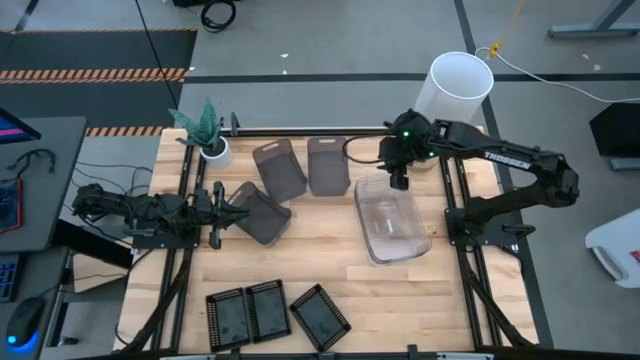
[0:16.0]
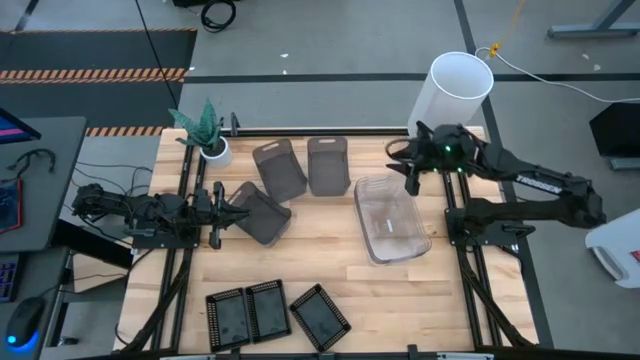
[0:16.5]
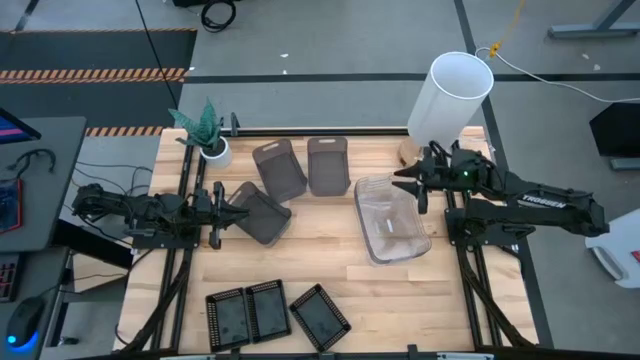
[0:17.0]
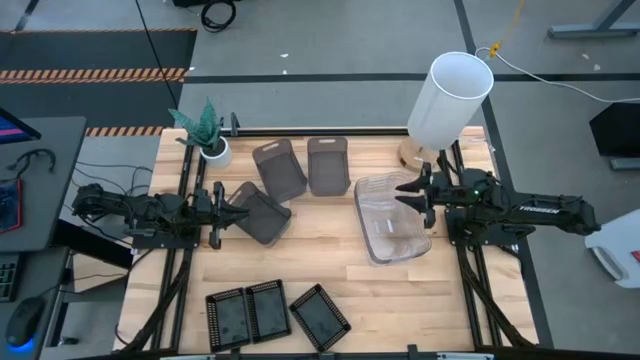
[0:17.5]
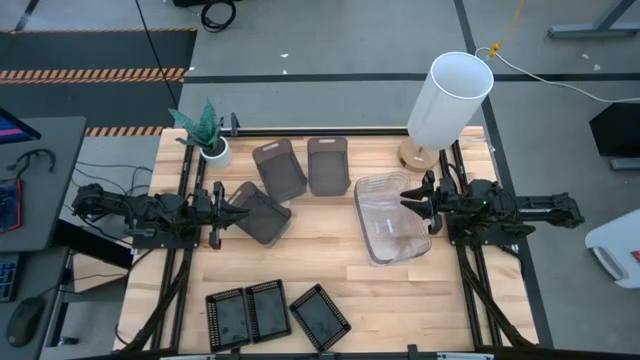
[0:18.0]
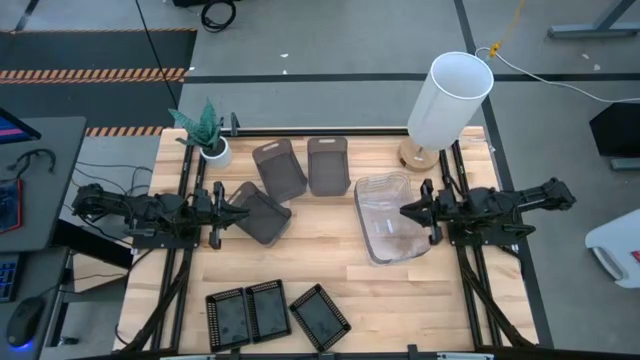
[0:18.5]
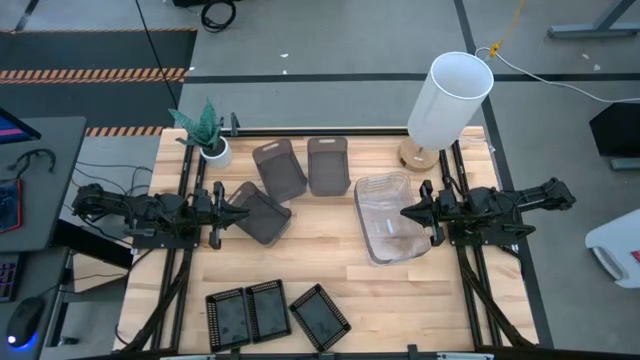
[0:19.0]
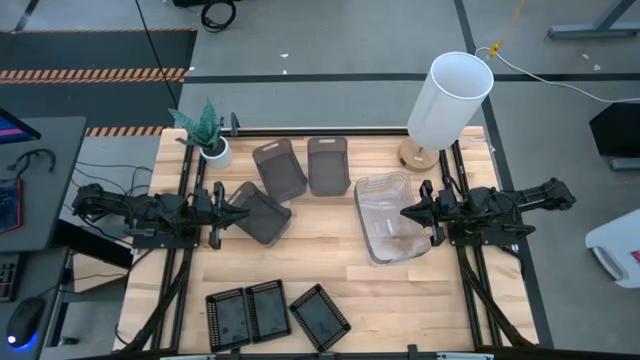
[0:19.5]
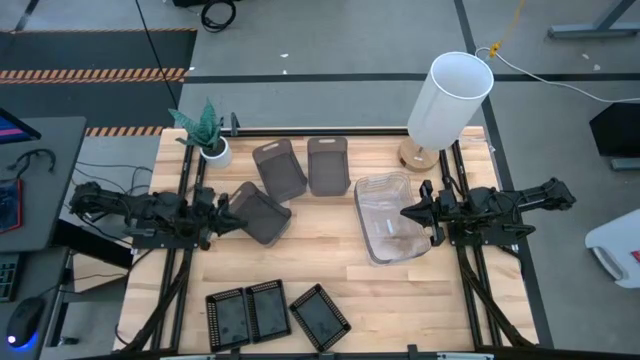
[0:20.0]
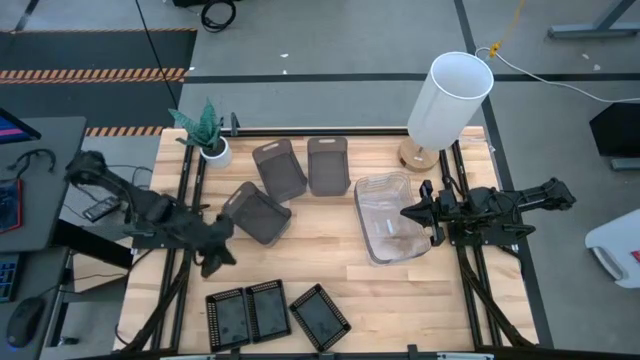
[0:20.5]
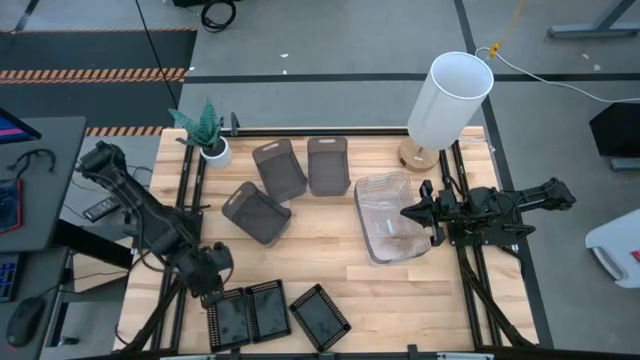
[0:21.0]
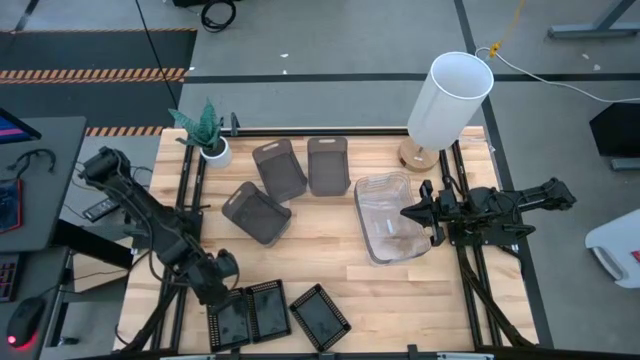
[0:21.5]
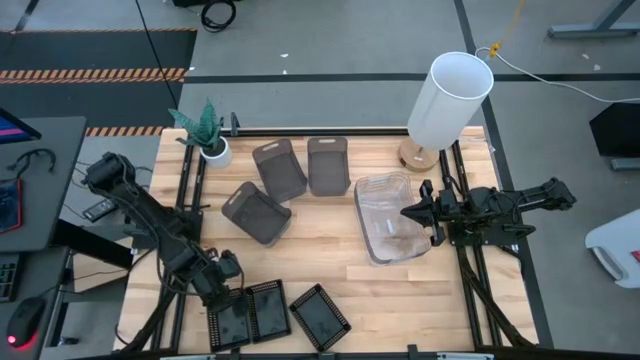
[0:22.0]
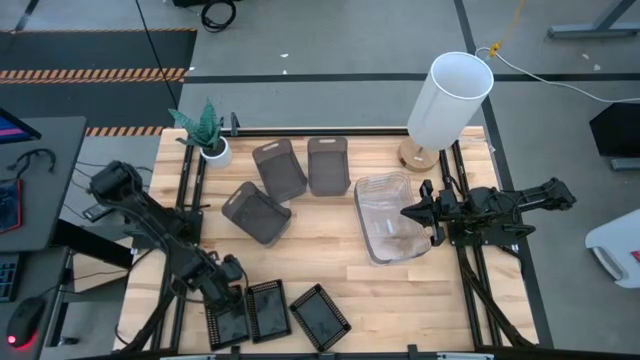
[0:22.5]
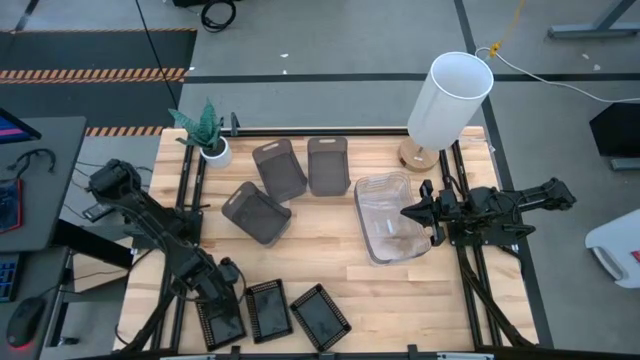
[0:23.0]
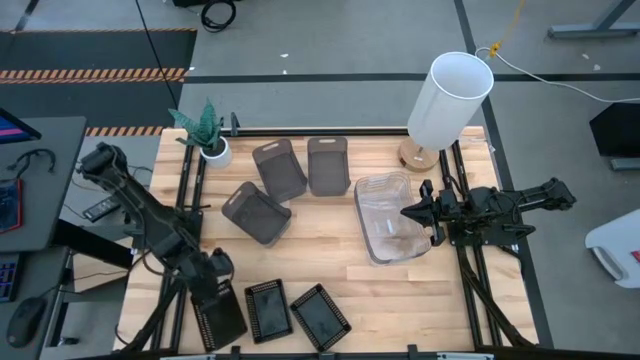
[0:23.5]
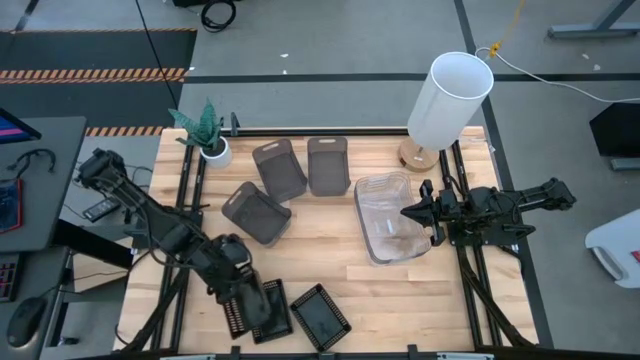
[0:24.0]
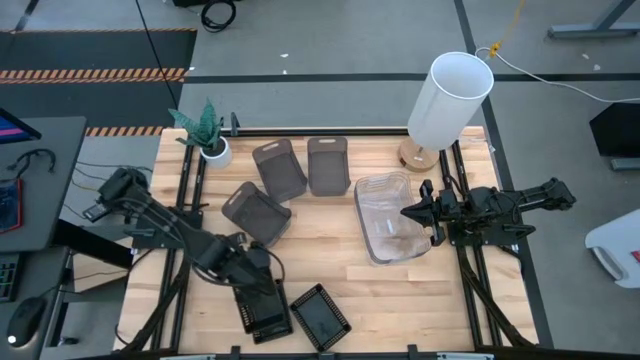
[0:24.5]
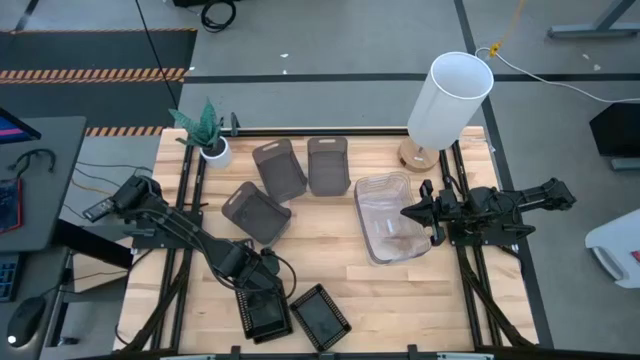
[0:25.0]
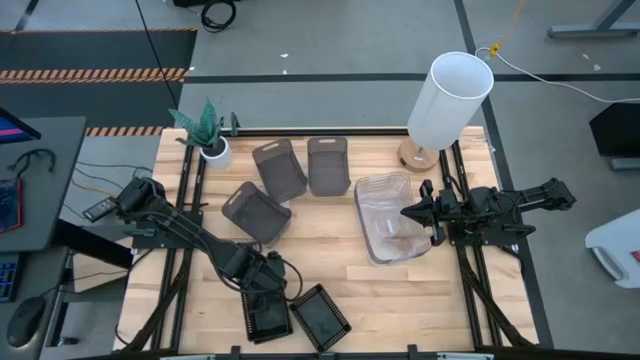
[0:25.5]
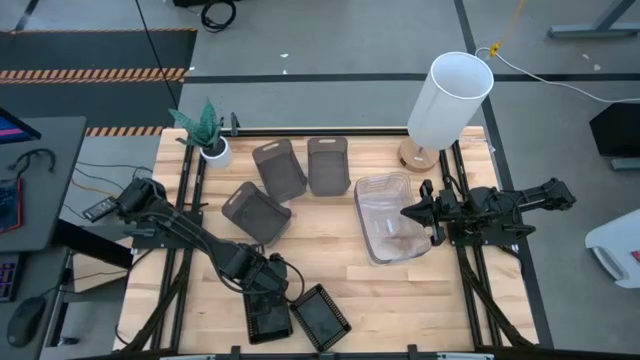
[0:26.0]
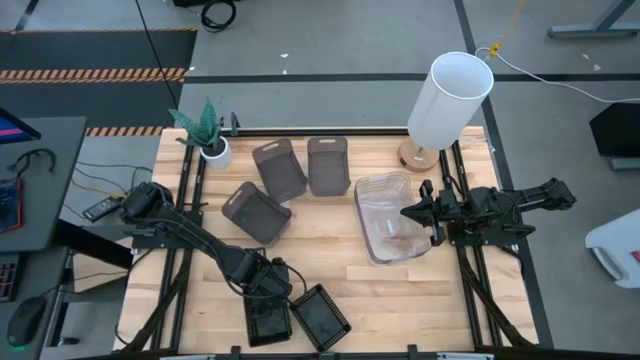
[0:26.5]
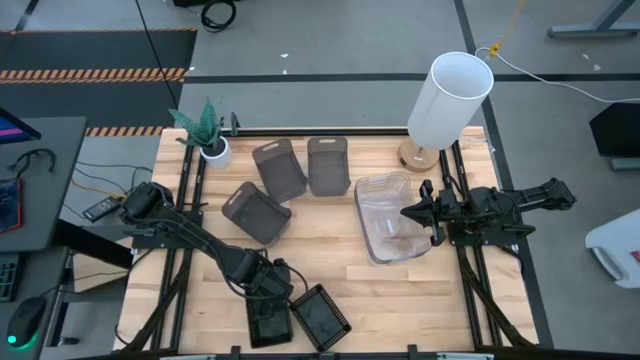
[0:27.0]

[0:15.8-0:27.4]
Stack the left black bin on the middle black bin

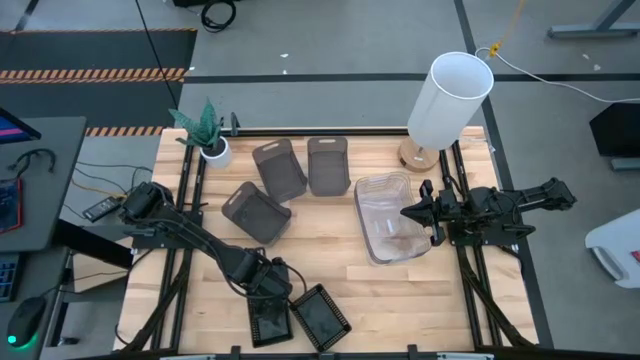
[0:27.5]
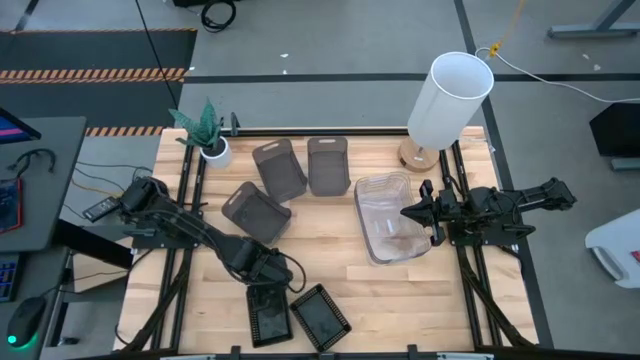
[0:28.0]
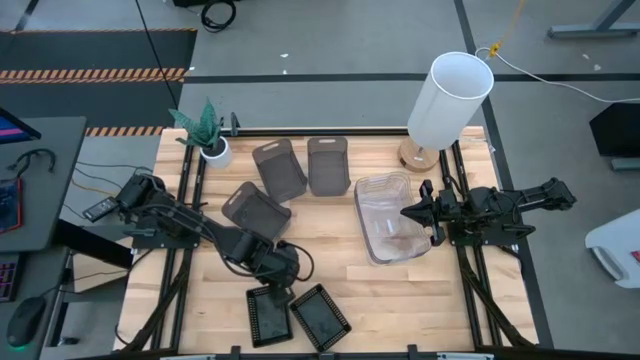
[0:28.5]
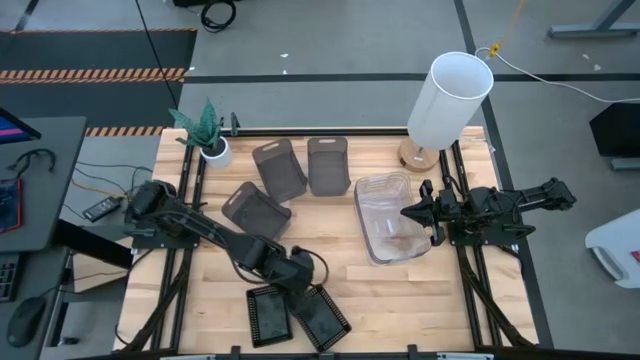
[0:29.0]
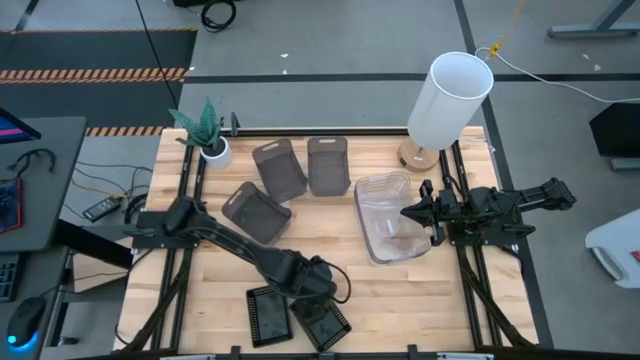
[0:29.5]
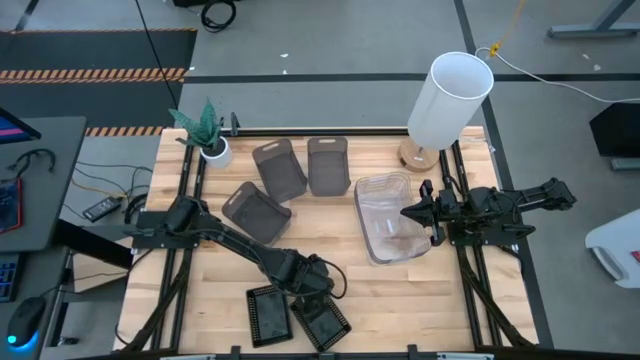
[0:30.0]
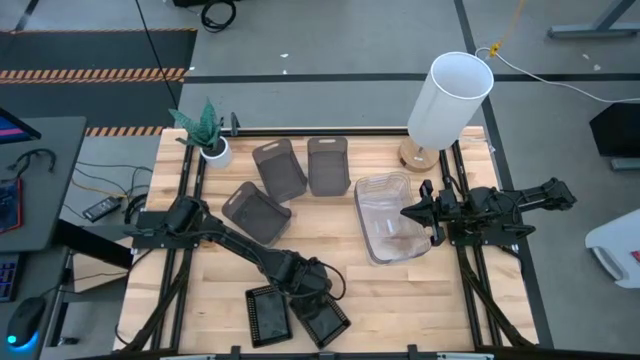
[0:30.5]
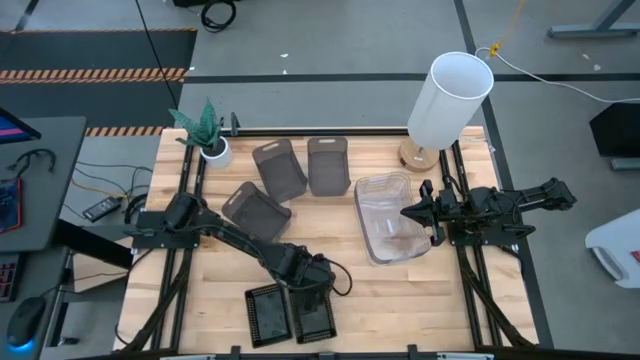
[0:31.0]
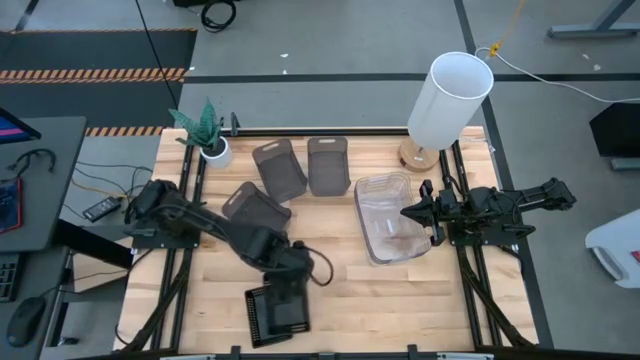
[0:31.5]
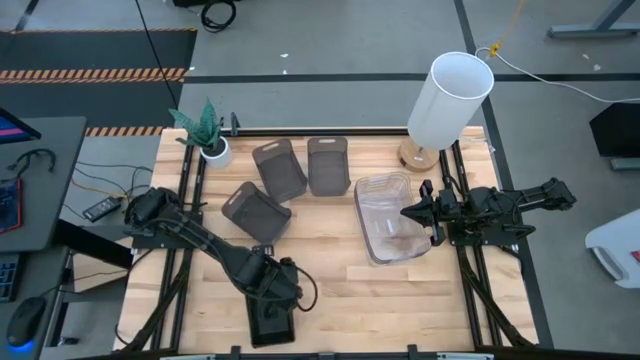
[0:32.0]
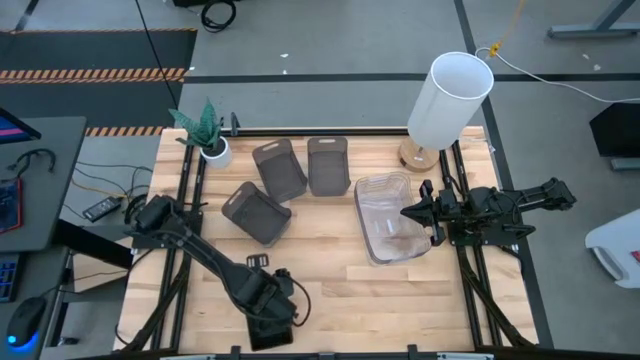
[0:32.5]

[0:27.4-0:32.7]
Stack the right black bin on the black bins

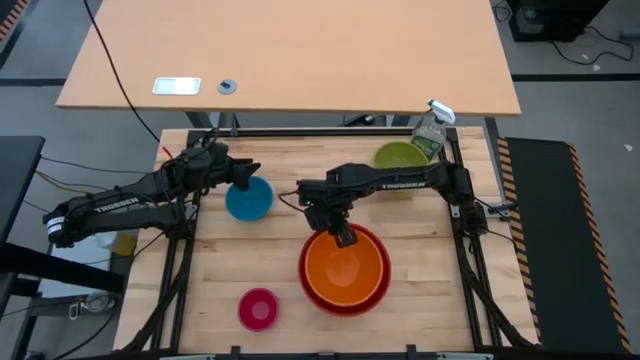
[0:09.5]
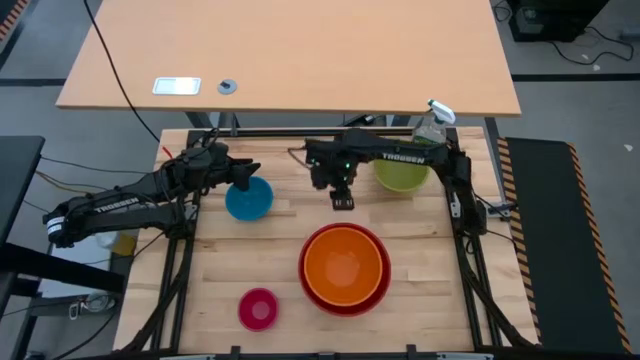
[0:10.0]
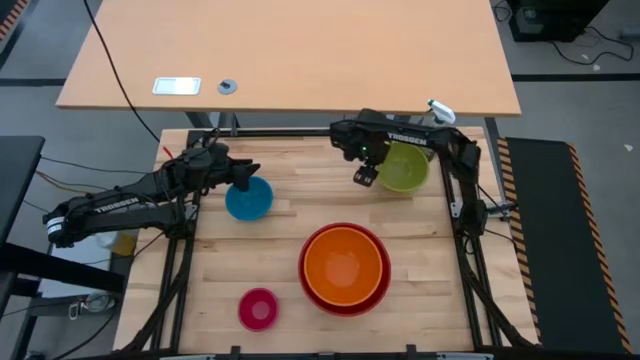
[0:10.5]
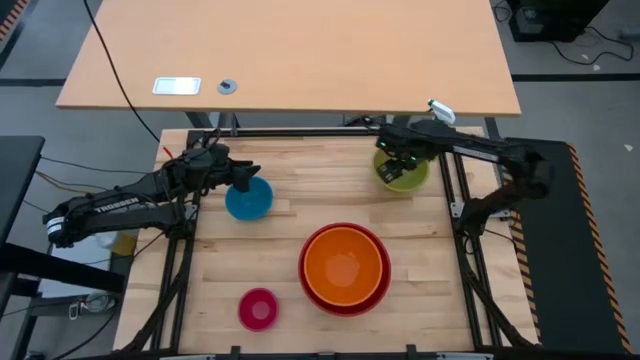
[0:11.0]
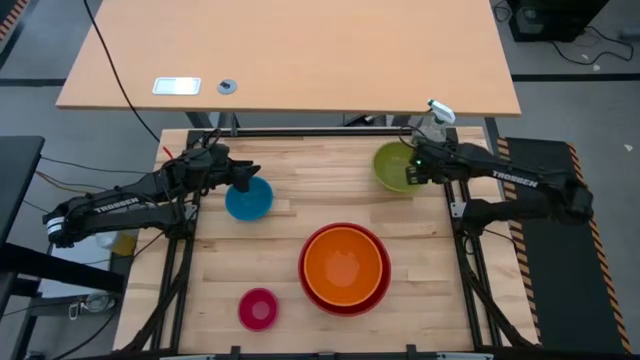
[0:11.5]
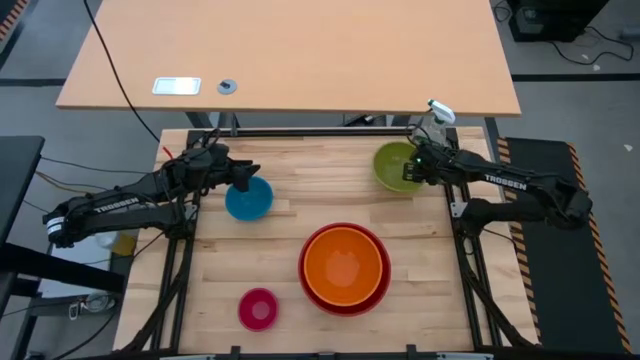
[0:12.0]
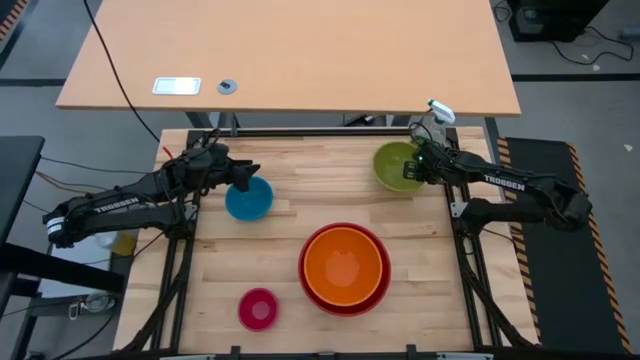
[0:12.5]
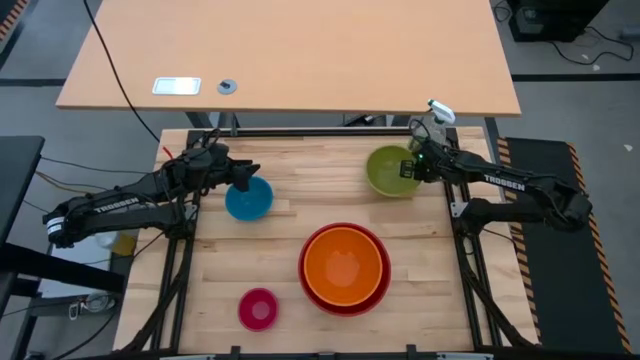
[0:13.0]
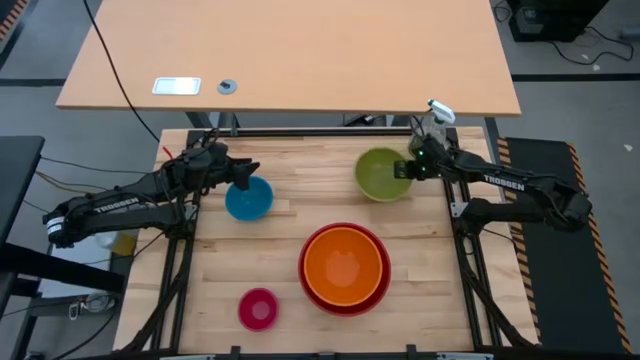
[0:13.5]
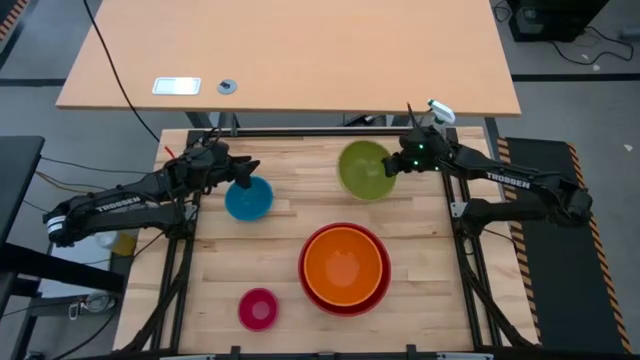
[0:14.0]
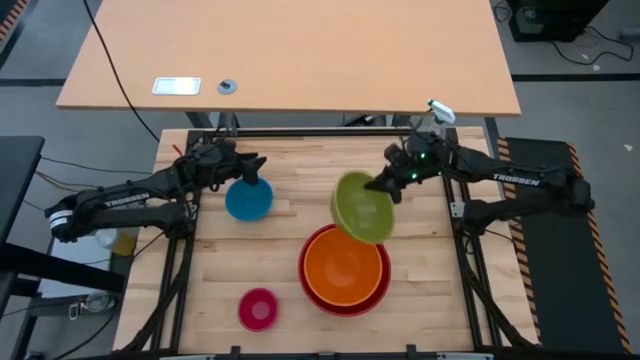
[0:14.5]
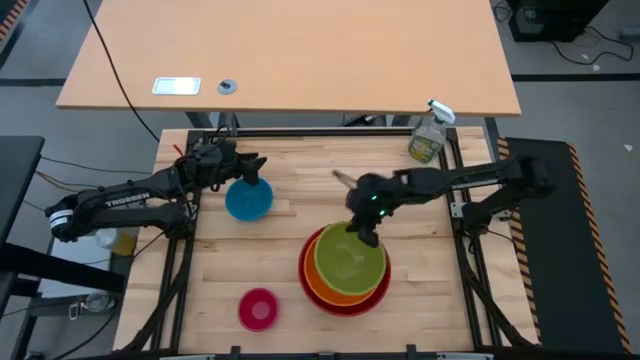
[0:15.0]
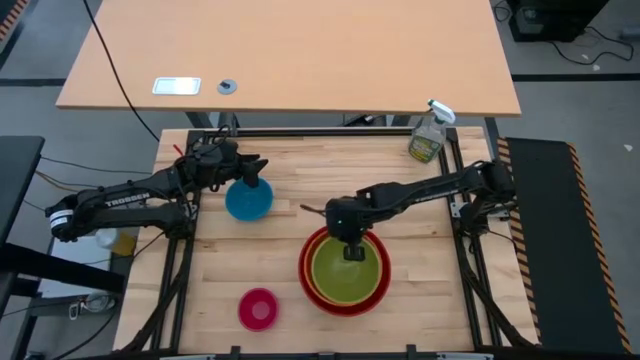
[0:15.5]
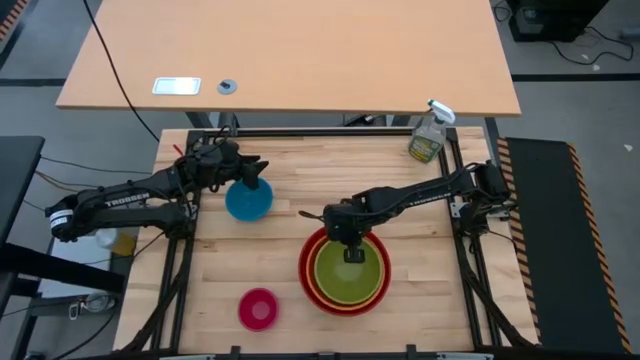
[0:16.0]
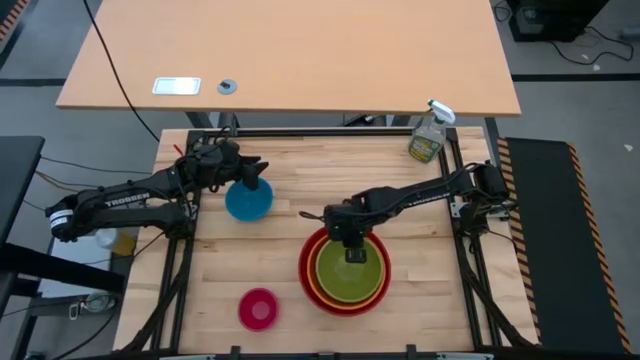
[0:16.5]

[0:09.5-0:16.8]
Stack the green bowl on top of the orange bowl
